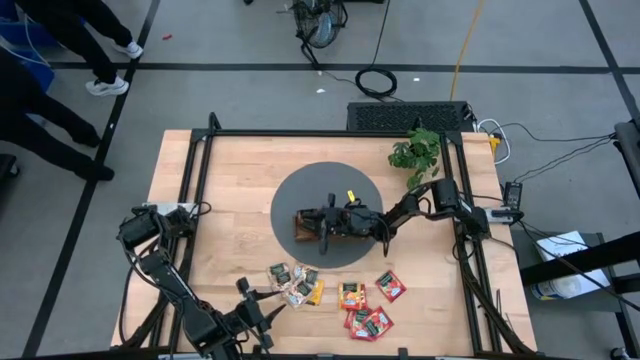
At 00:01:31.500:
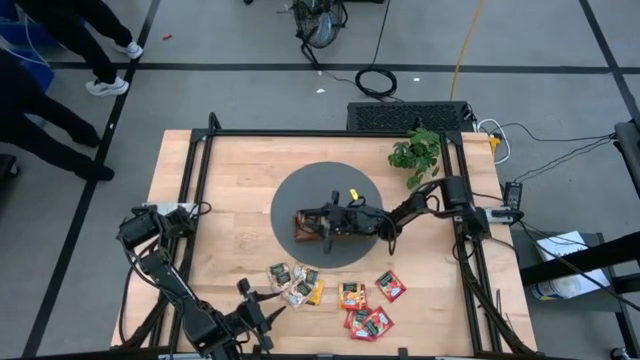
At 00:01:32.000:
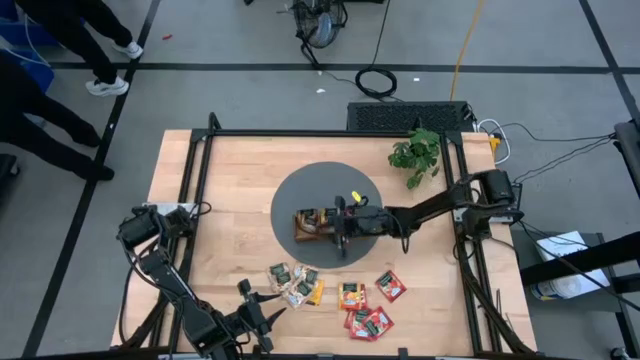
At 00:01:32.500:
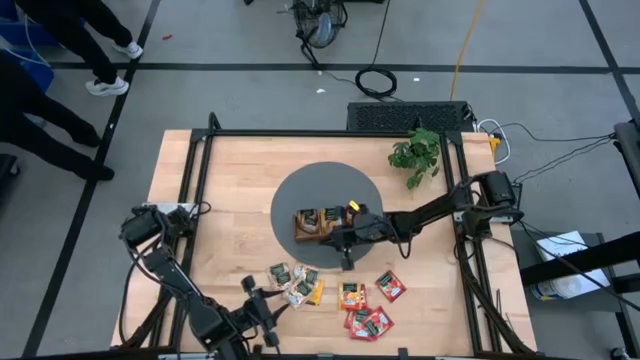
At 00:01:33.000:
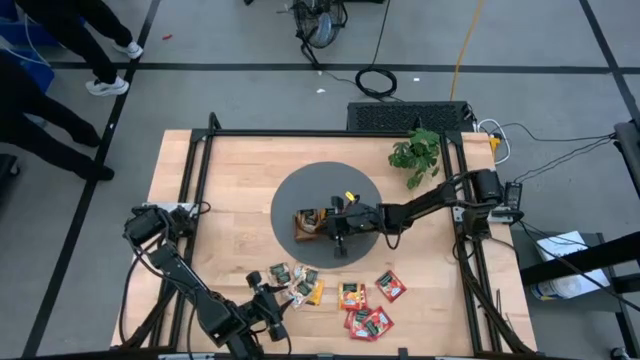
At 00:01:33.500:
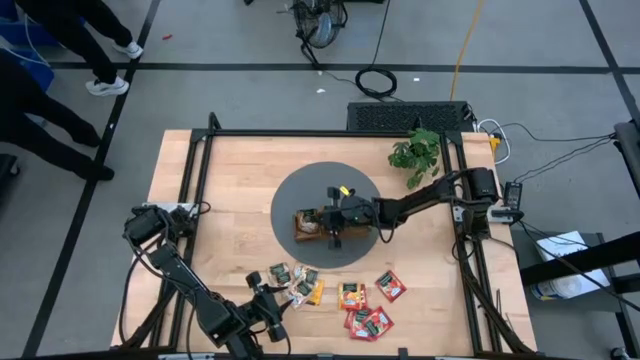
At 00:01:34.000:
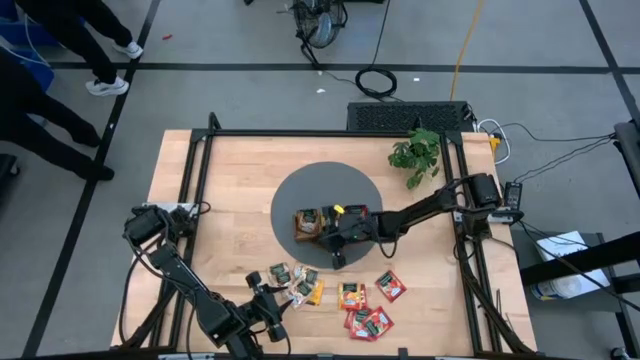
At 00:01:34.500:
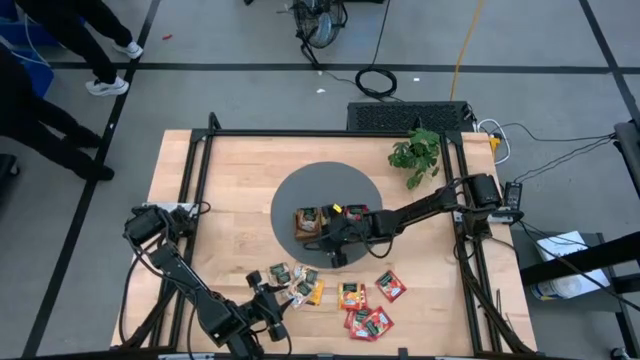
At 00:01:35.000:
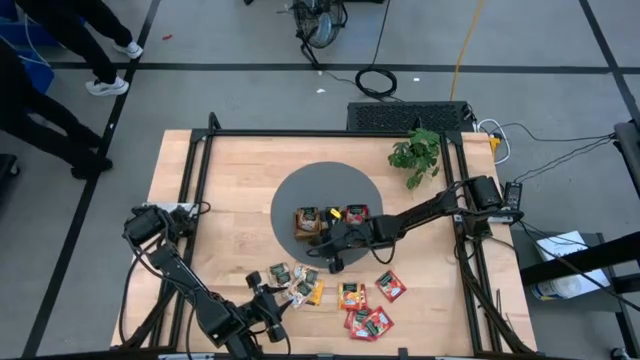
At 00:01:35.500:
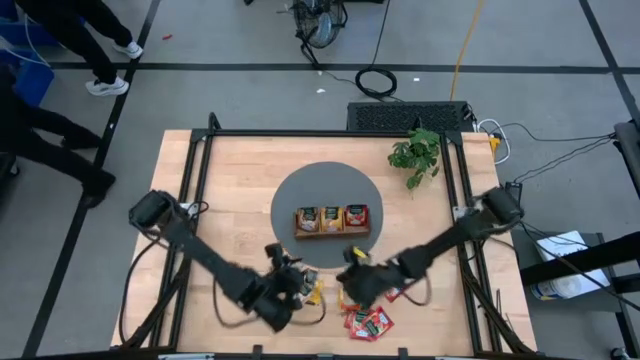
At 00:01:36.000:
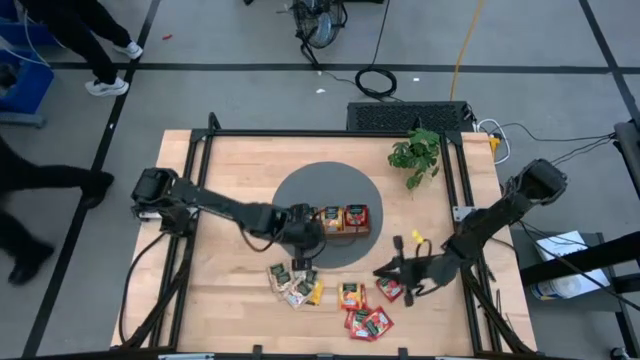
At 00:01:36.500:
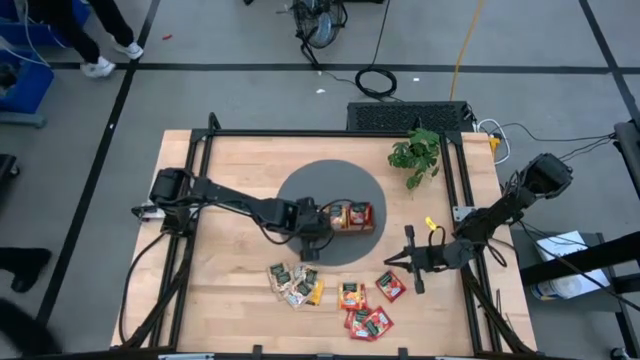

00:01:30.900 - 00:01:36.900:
Task: Pick & Place Tea
Adjust the wooden organizer on the mat

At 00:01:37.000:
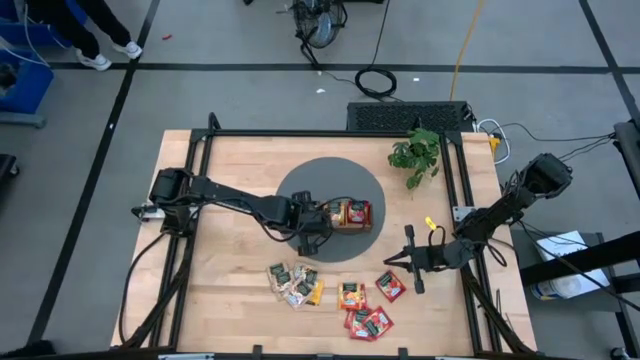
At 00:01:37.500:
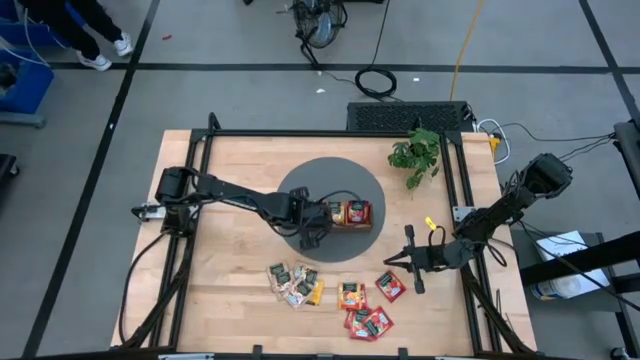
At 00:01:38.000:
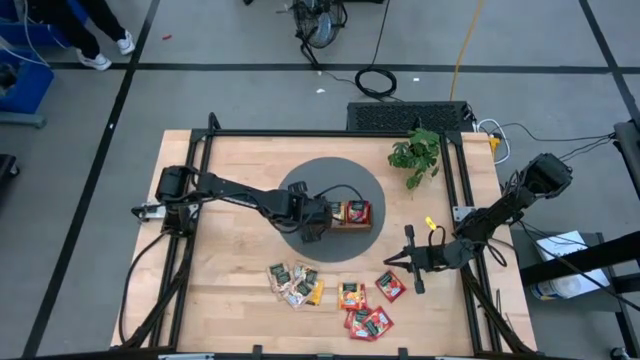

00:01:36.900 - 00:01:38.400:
Adjust the brown tea bag in the wooden organizer

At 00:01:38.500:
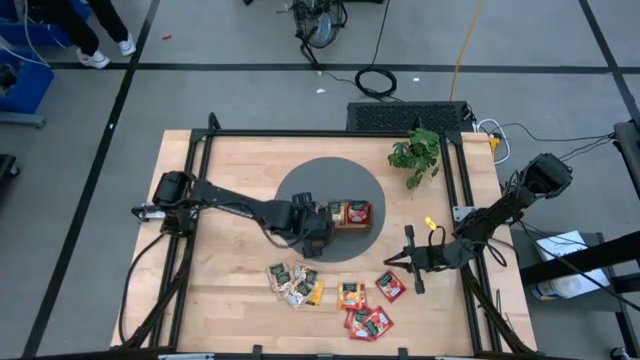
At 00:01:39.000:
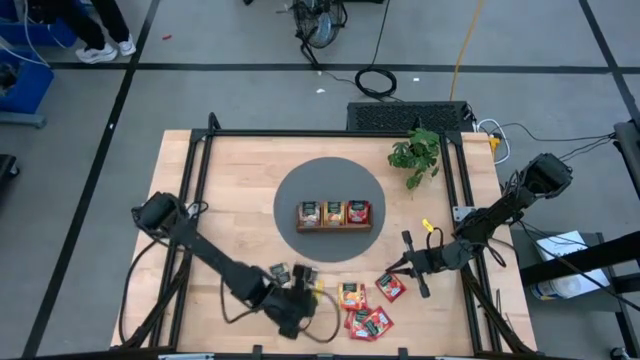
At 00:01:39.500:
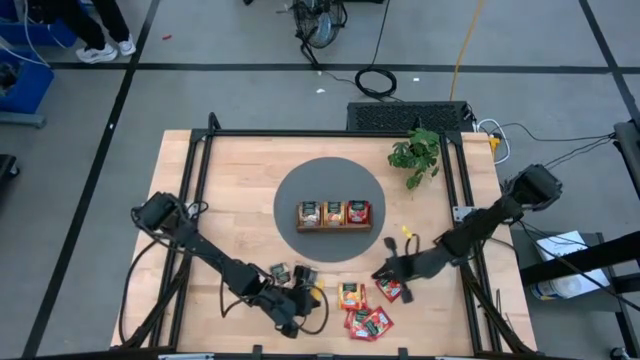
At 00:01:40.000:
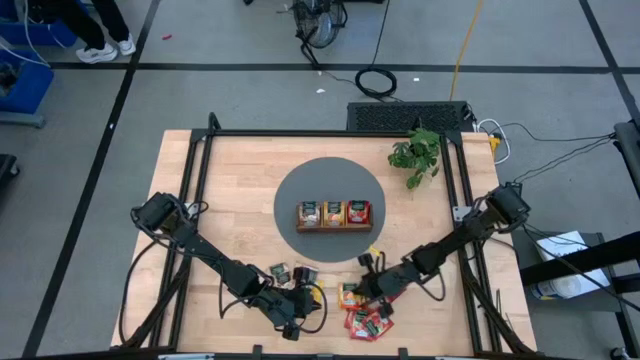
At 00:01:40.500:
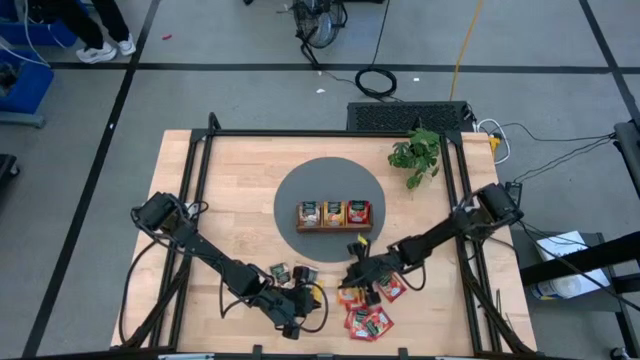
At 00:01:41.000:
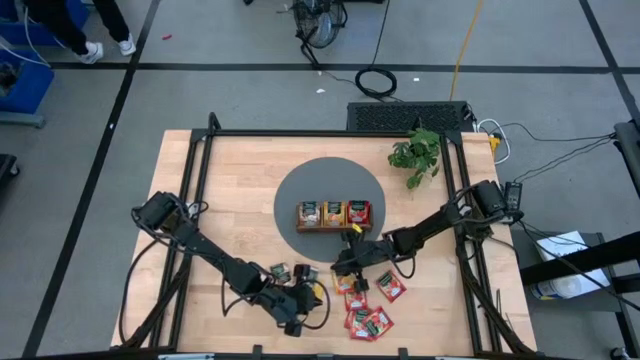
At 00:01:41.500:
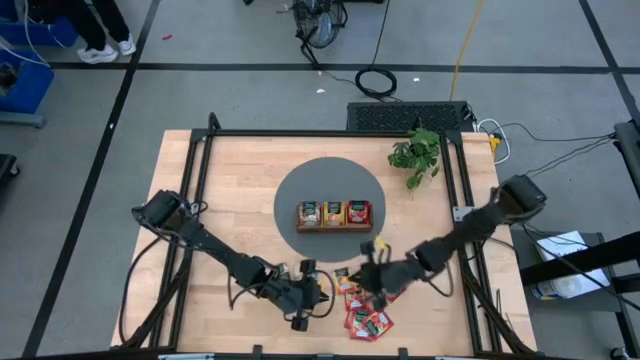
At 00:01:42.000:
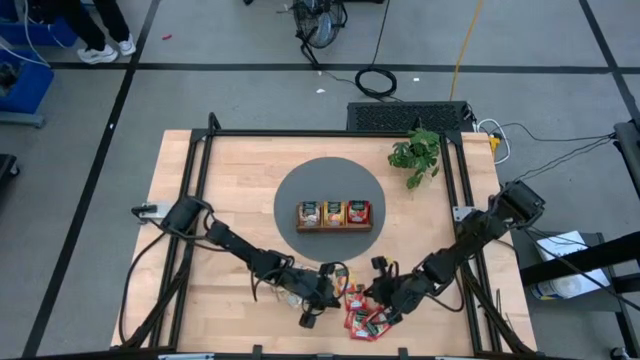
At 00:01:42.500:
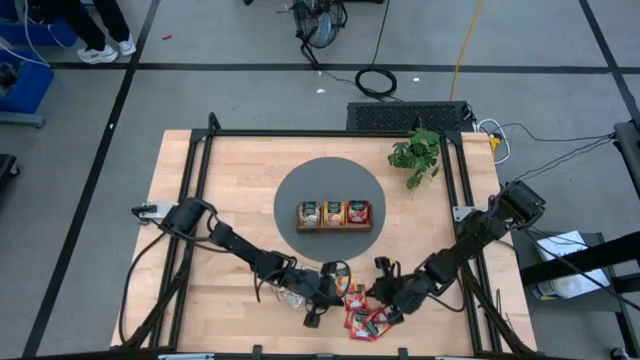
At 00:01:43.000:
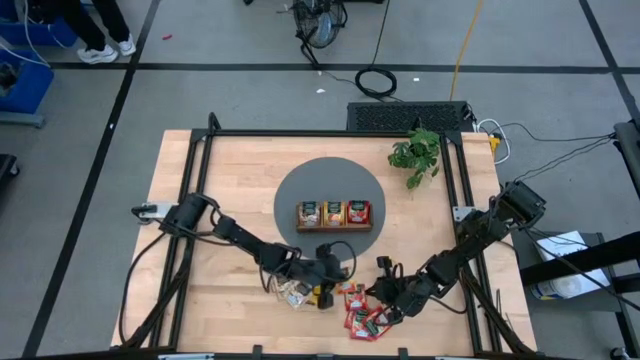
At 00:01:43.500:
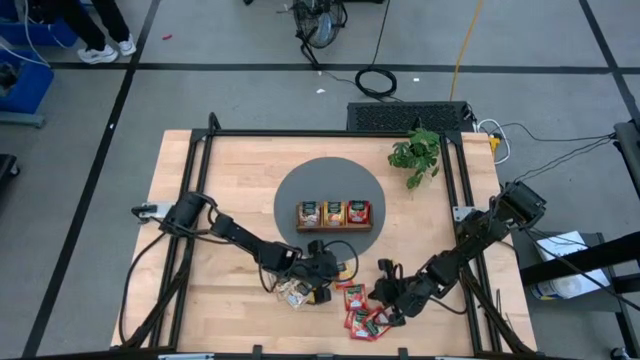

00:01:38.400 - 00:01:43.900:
Adjust the orange tea bag on the table

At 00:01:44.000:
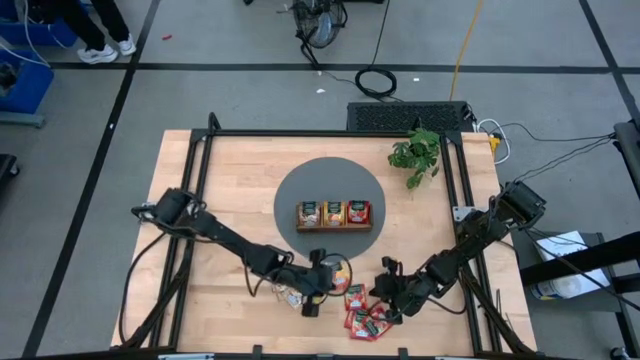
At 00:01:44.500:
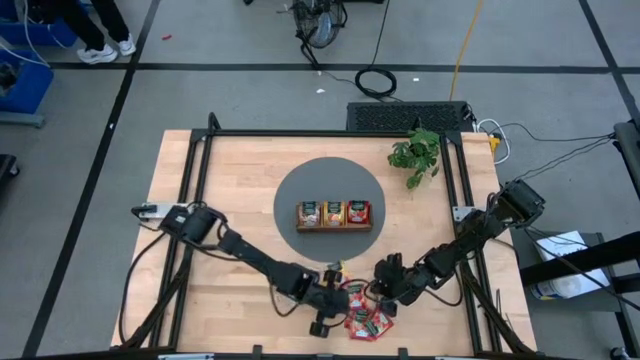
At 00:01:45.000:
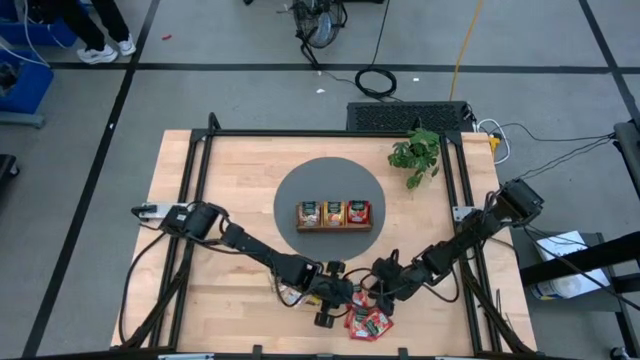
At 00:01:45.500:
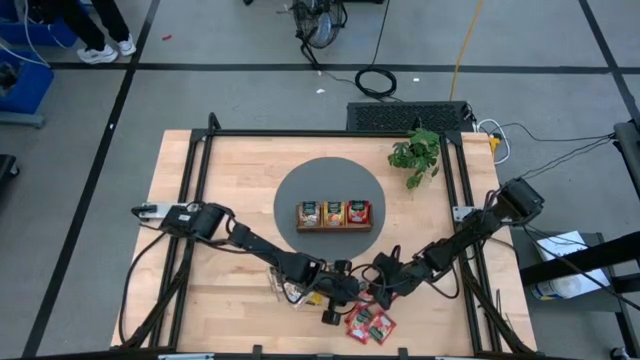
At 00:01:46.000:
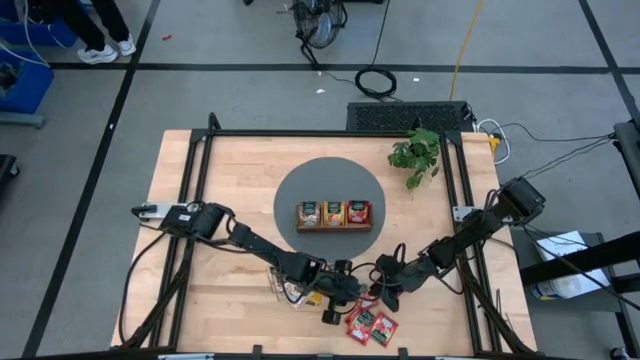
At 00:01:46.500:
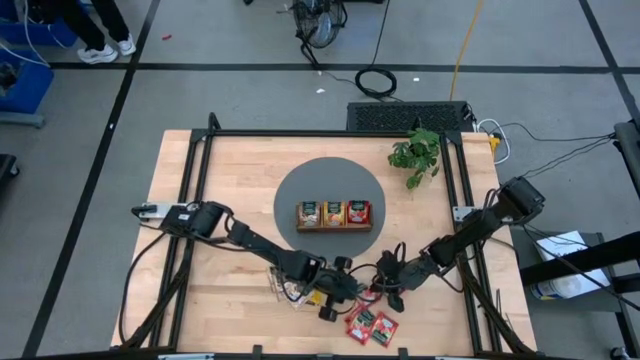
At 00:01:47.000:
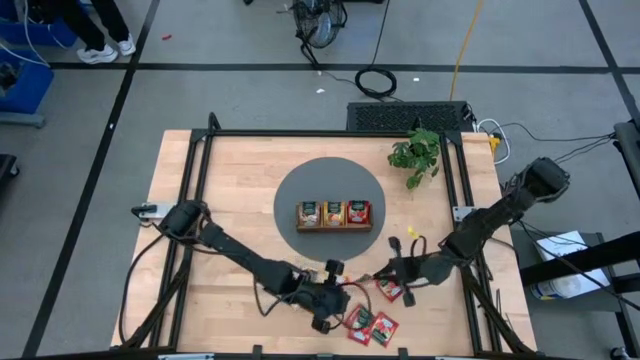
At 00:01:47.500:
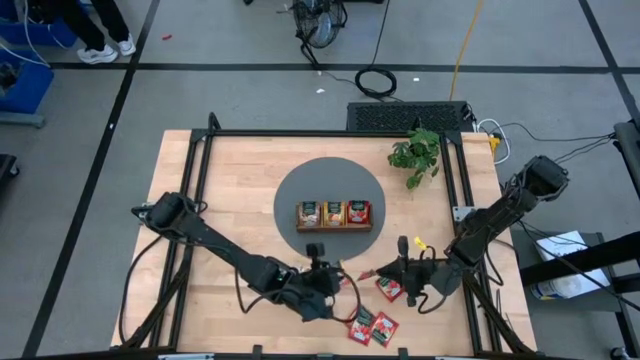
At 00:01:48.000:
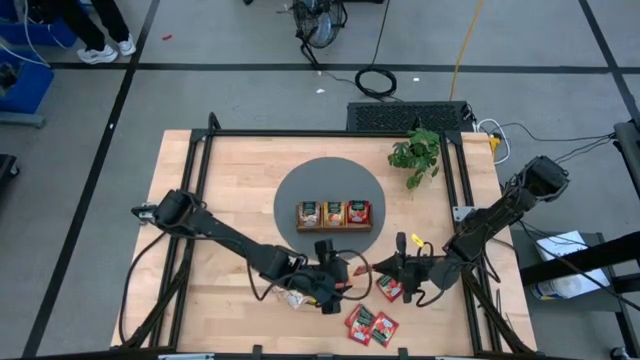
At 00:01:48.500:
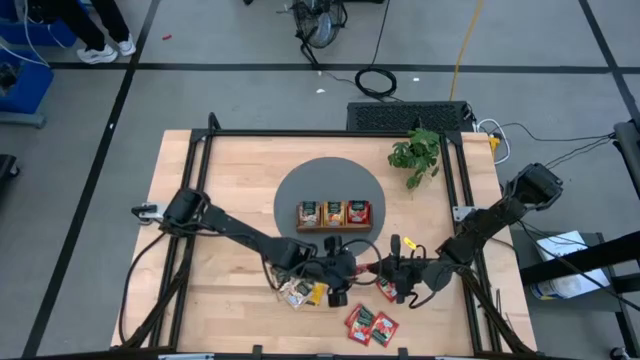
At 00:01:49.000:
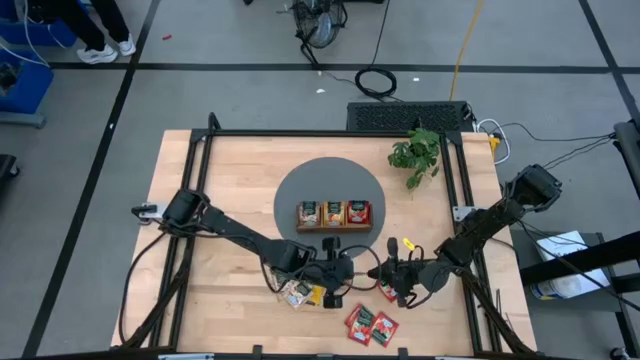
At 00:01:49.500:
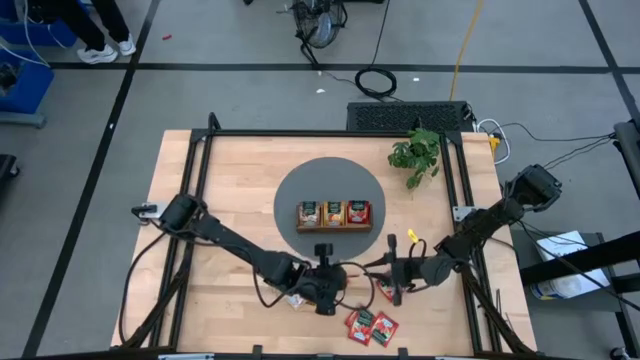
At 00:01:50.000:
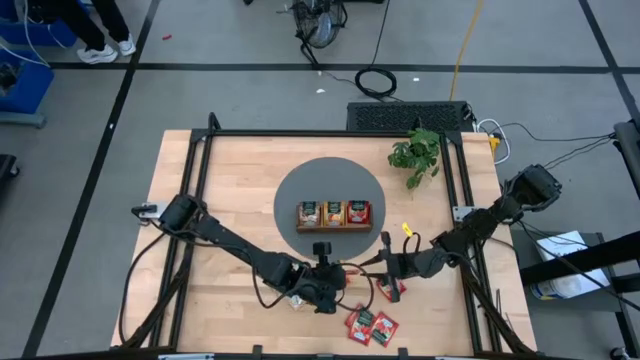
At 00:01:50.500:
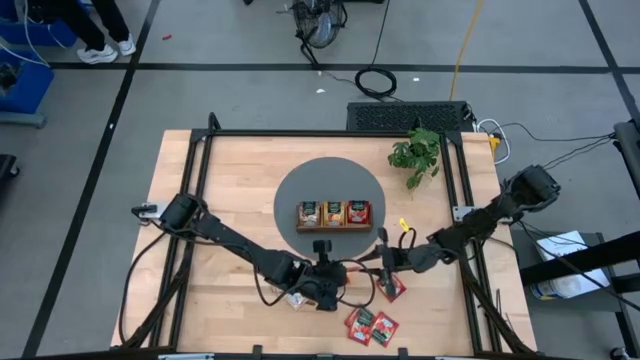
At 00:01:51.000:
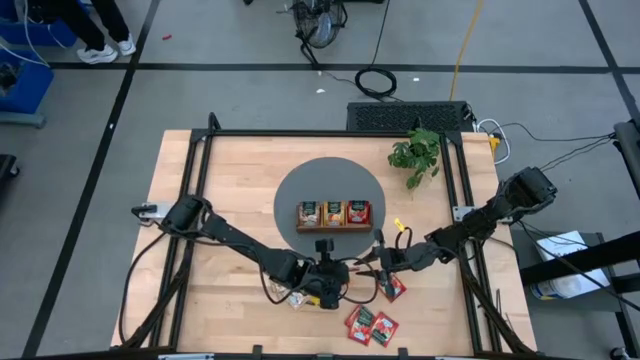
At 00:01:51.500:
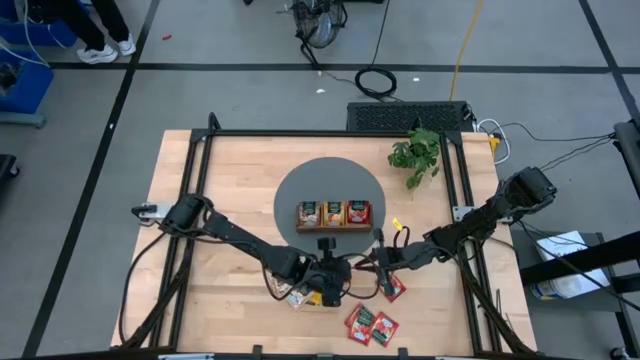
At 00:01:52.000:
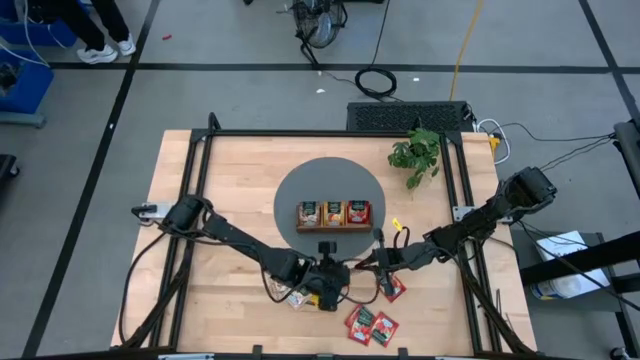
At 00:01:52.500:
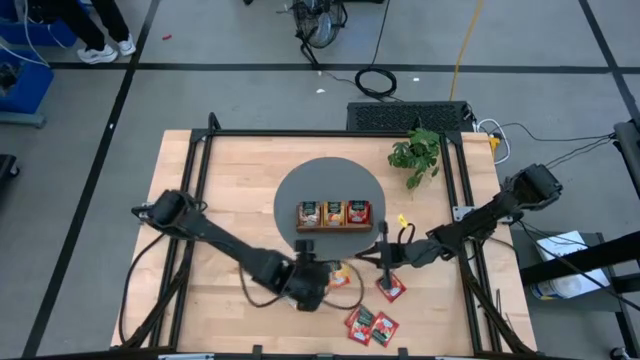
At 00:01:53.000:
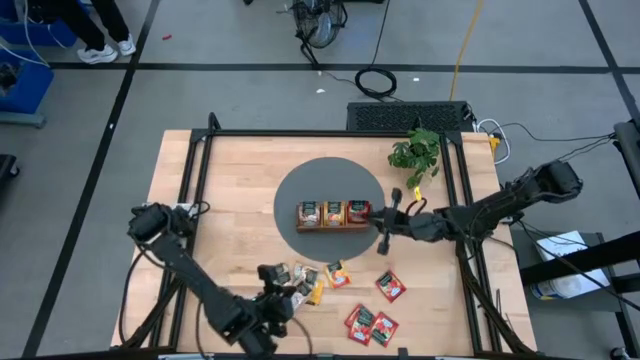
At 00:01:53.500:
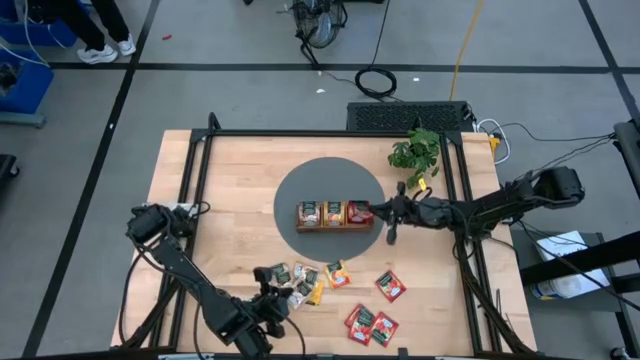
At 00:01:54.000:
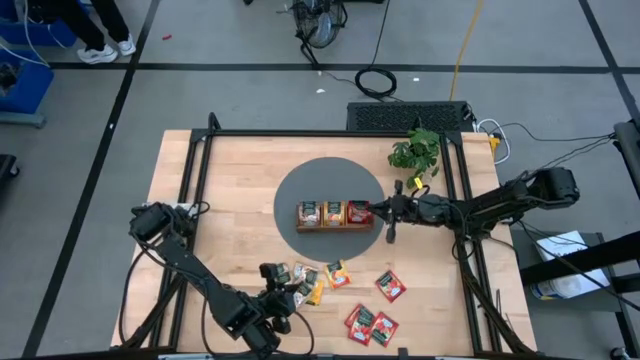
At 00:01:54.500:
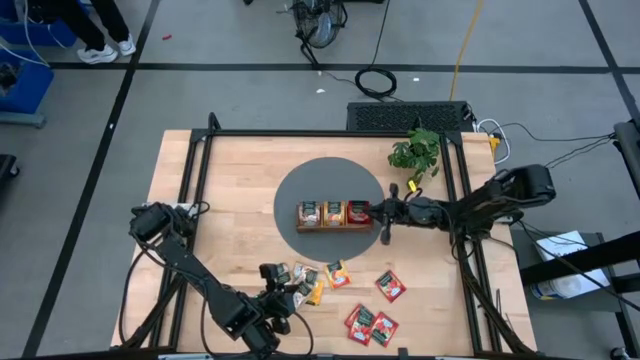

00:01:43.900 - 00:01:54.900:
Put the red tea bag into the right slot of the wooden organizer
